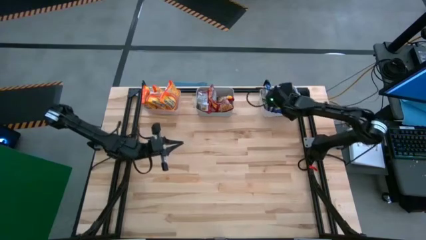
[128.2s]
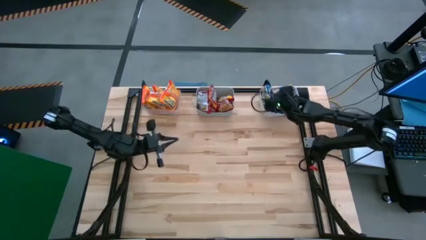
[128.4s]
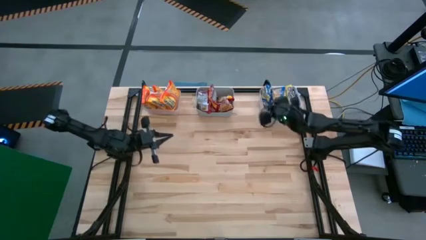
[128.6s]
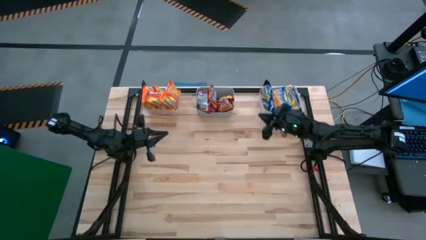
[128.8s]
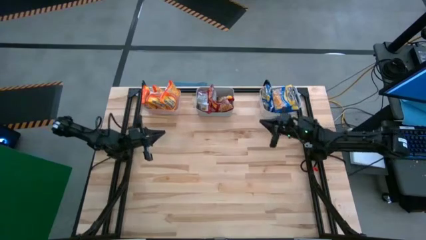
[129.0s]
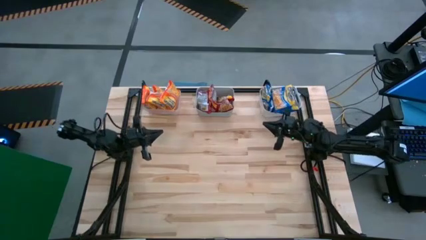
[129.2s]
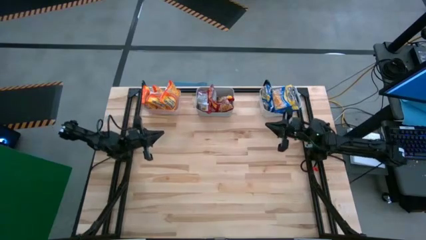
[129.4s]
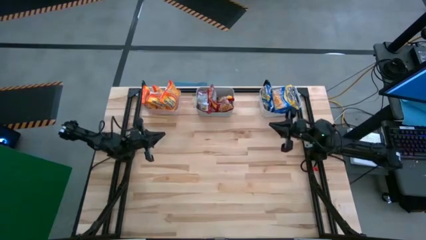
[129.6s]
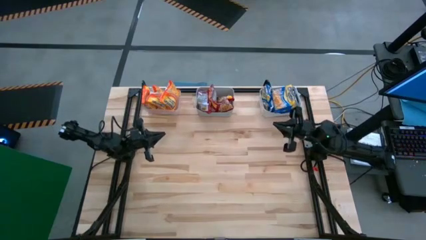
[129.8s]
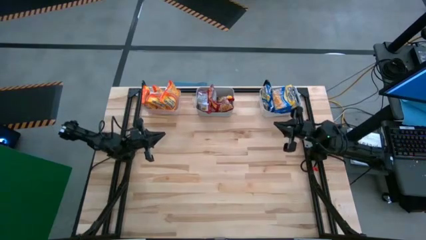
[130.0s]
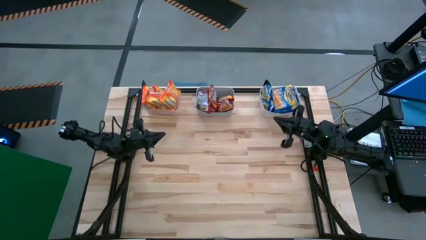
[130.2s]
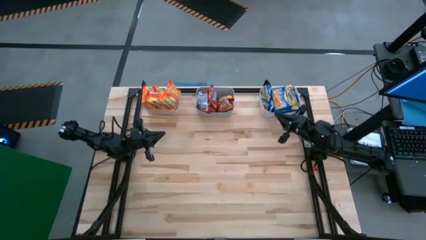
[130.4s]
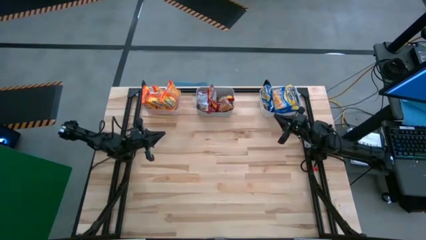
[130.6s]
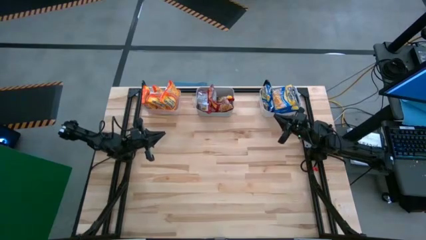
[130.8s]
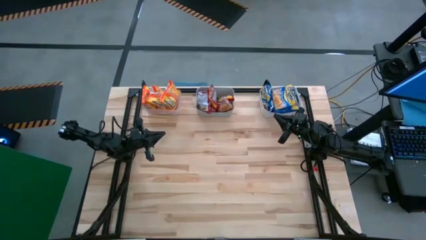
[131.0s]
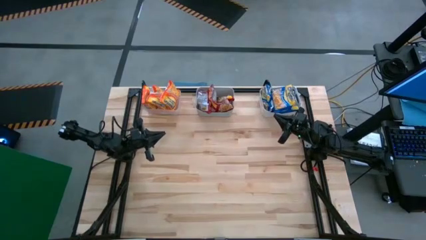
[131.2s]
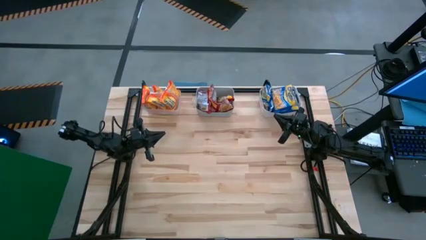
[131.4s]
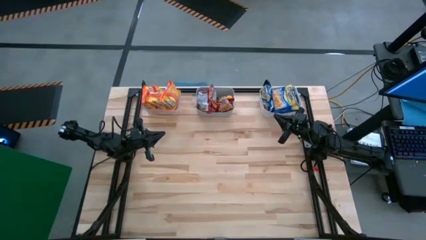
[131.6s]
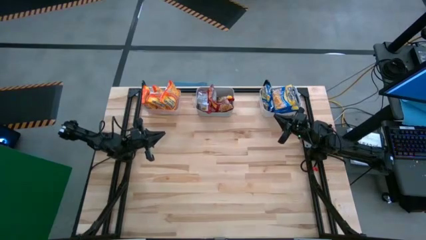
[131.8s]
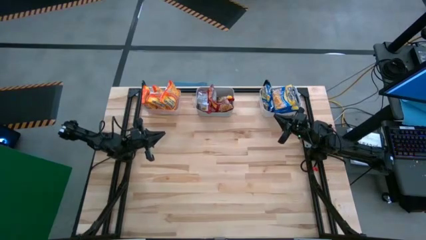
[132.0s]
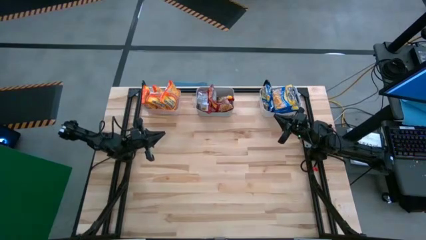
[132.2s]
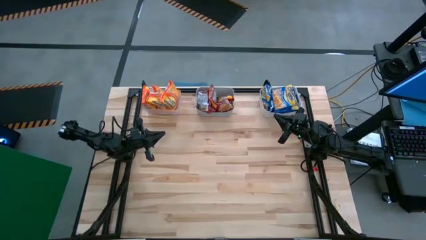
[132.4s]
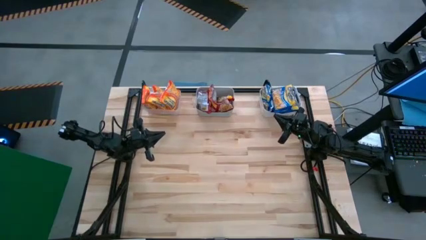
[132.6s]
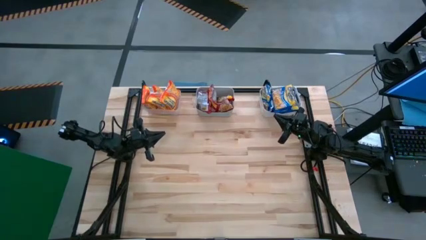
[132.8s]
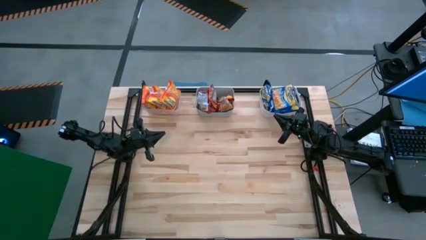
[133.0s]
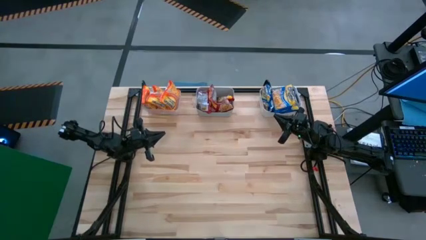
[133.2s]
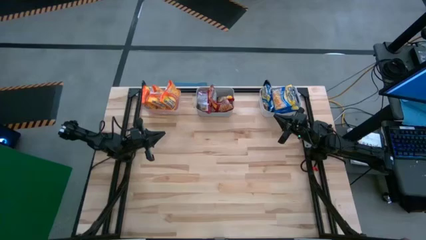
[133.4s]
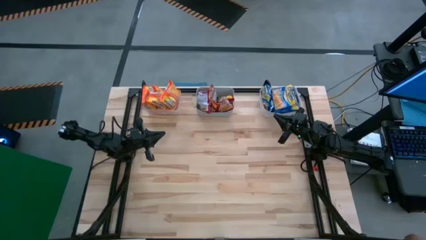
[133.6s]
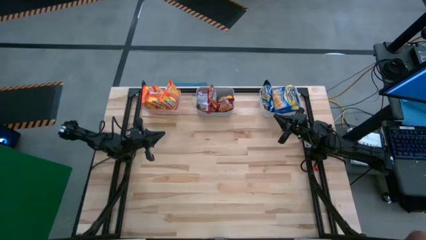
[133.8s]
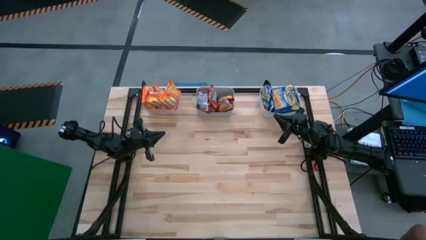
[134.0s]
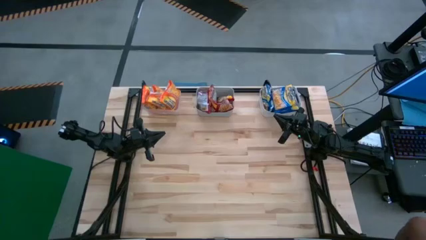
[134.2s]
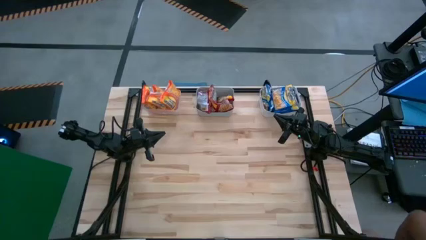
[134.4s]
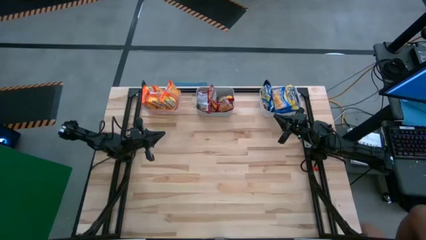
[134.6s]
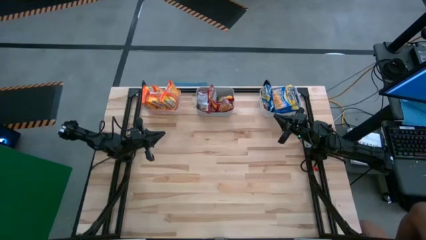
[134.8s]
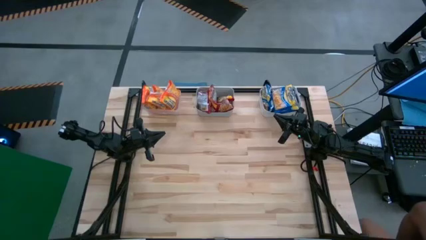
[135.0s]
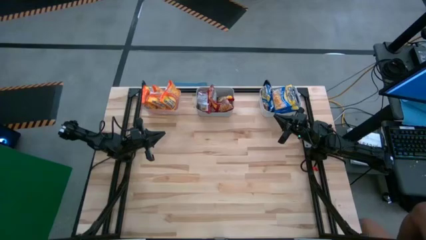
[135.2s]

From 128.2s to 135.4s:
Task: Sort Maruchan noodles
Return to home position

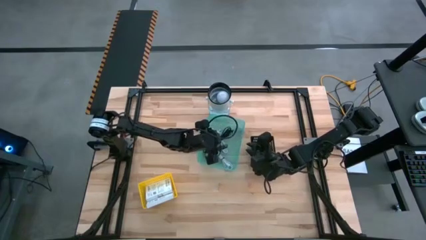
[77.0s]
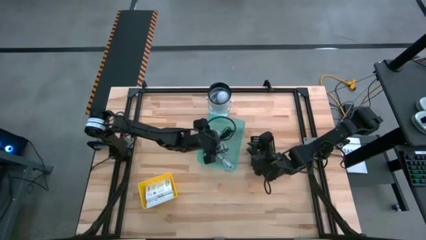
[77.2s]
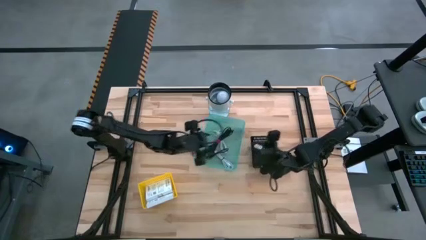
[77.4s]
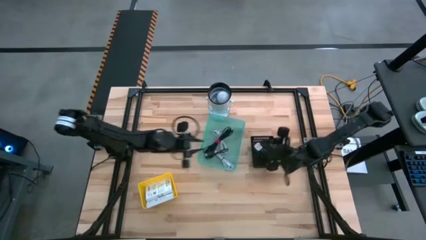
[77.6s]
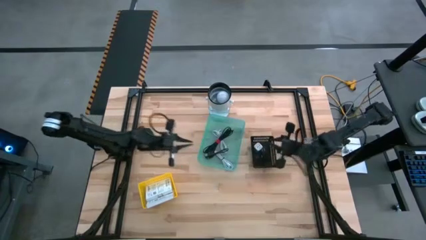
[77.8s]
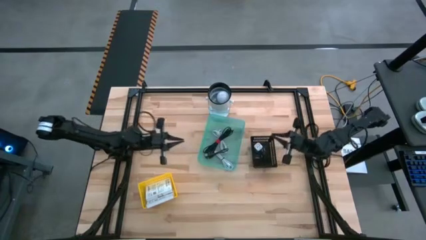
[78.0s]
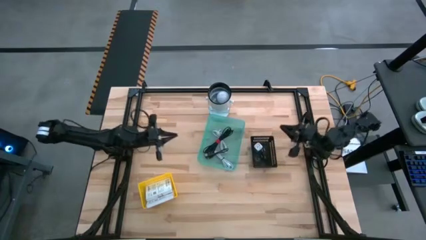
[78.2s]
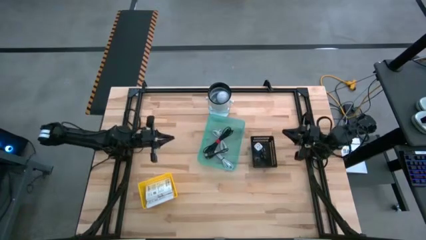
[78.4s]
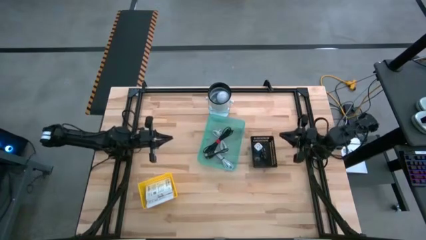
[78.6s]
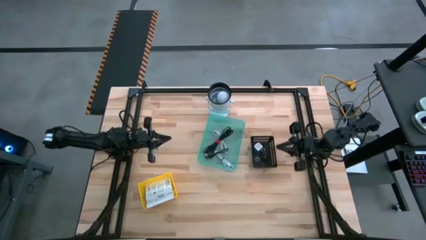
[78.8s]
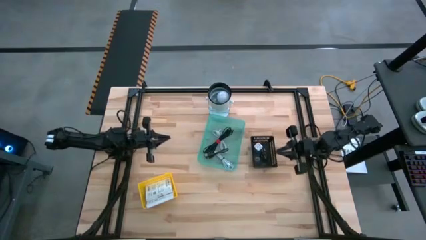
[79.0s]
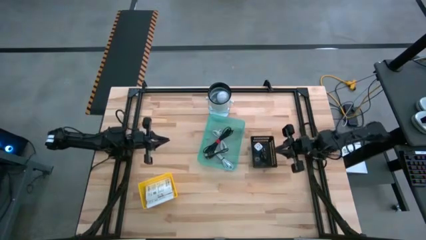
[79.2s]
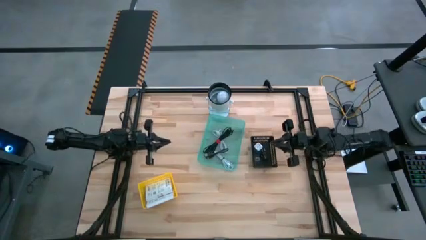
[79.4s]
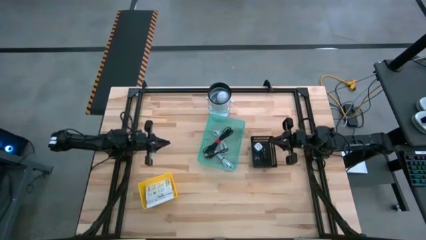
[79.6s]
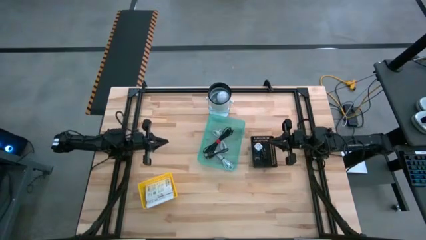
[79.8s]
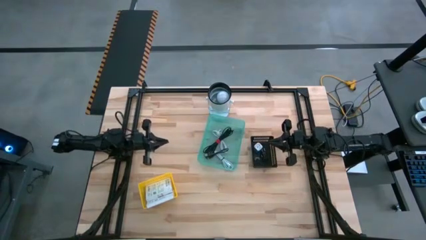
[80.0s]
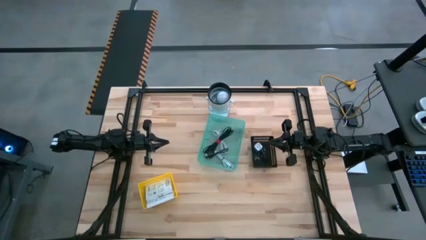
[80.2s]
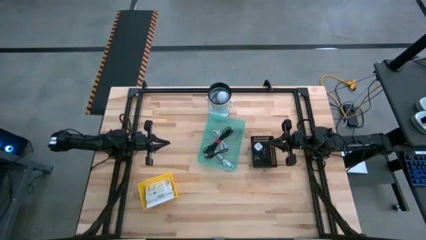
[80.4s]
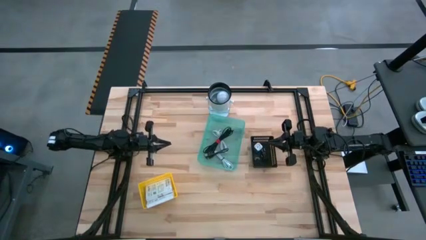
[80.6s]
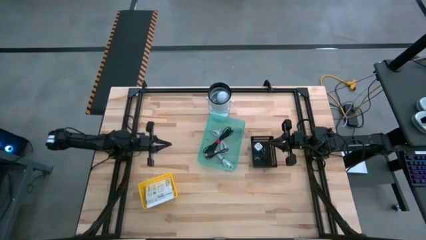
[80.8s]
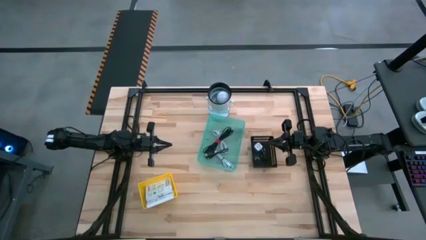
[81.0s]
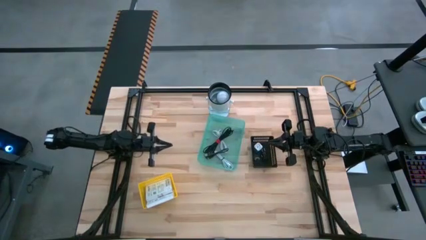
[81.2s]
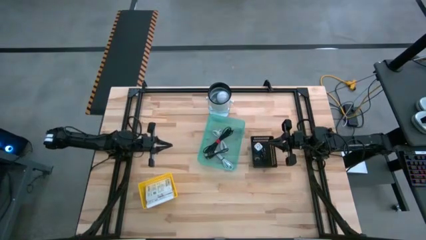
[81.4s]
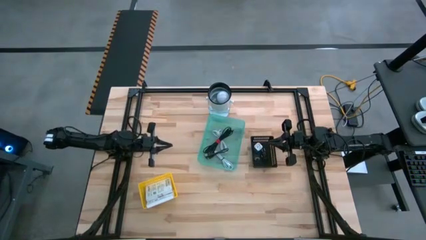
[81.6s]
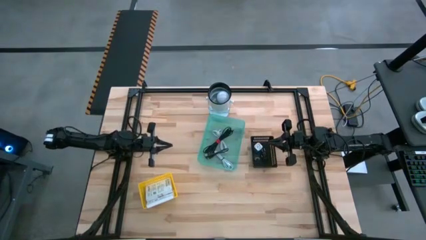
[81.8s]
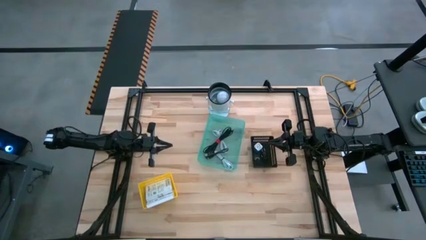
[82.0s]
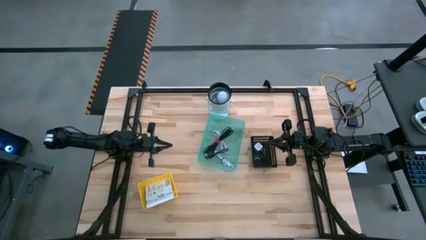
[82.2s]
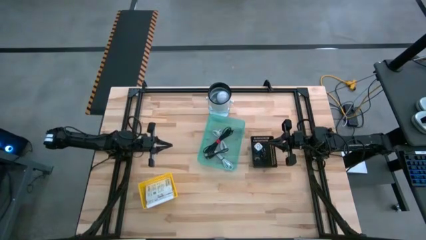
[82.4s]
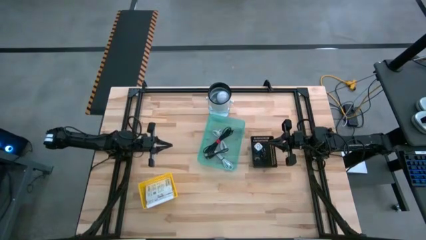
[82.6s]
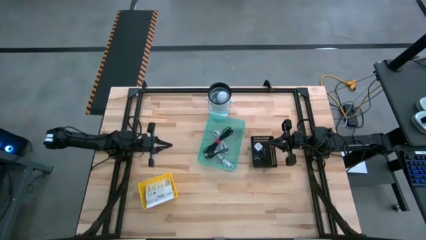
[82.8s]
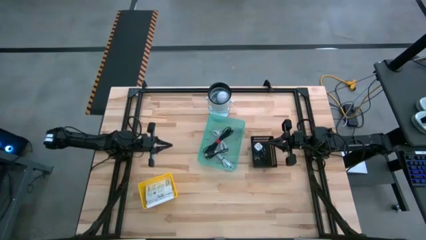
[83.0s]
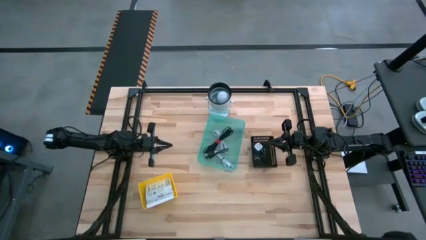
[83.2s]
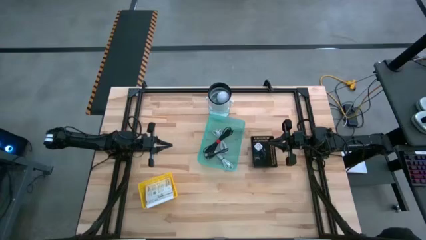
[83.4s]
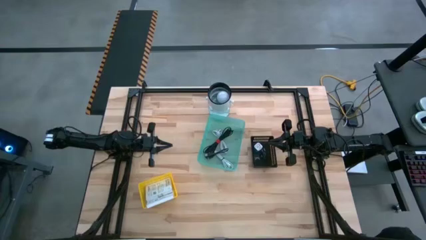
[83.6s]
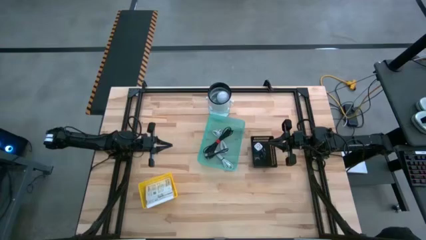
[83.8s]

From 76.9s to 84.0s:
Task: Pick and place items into bin
Return to Home Position
